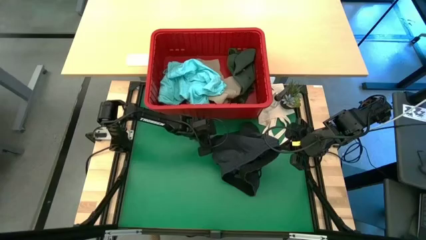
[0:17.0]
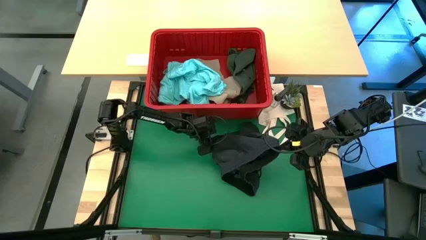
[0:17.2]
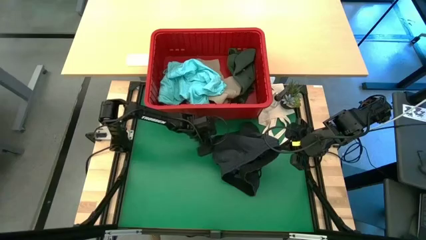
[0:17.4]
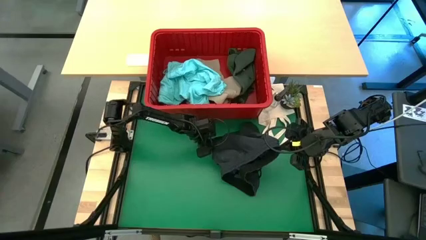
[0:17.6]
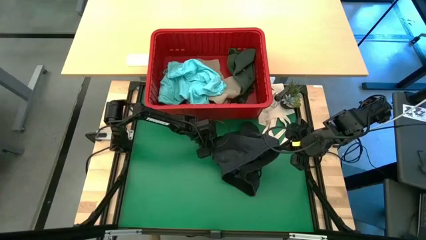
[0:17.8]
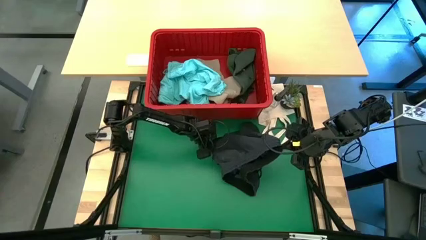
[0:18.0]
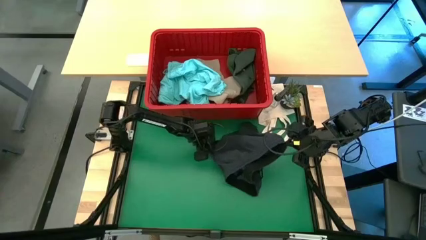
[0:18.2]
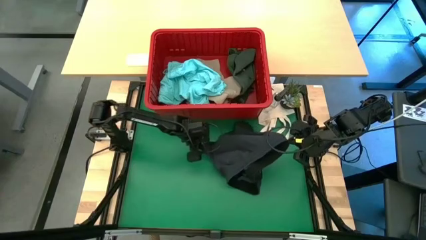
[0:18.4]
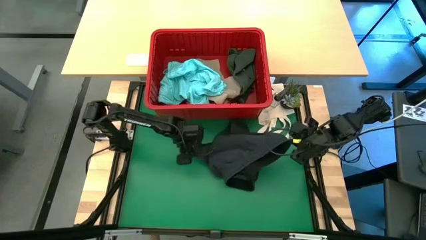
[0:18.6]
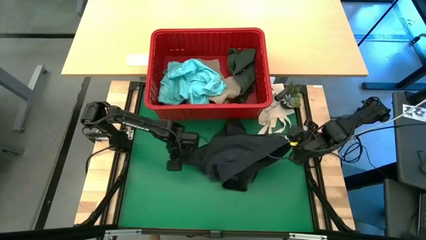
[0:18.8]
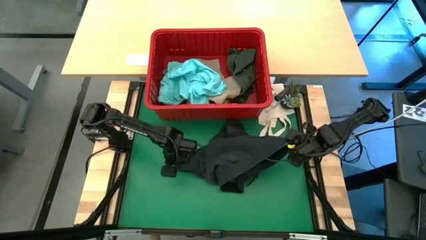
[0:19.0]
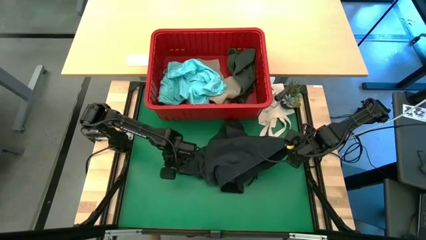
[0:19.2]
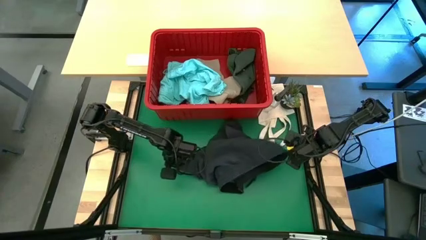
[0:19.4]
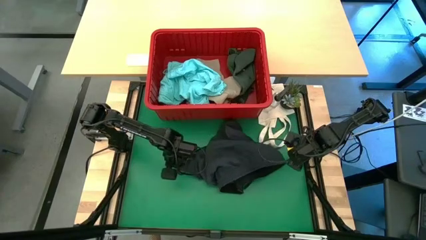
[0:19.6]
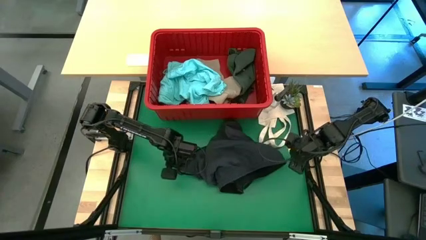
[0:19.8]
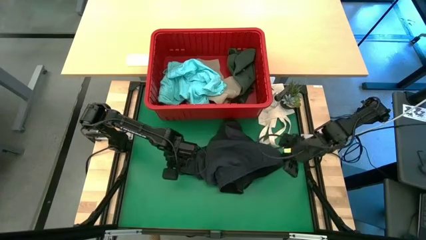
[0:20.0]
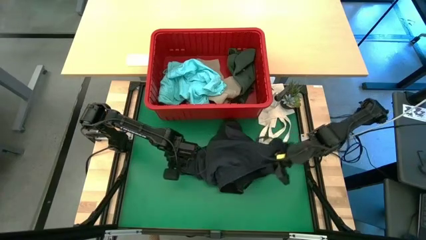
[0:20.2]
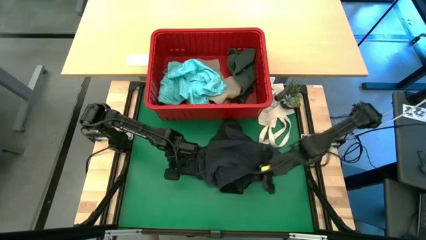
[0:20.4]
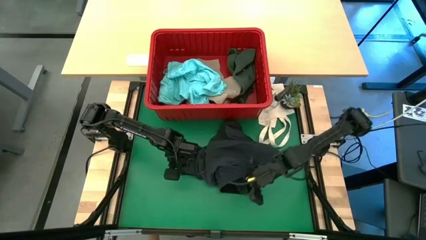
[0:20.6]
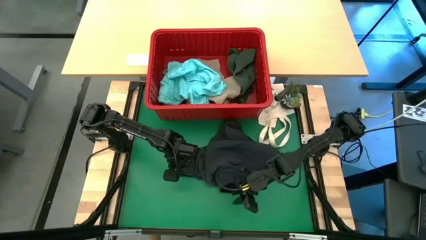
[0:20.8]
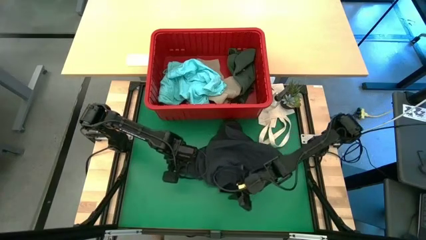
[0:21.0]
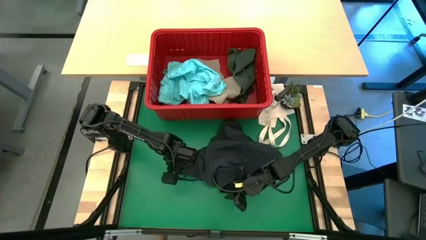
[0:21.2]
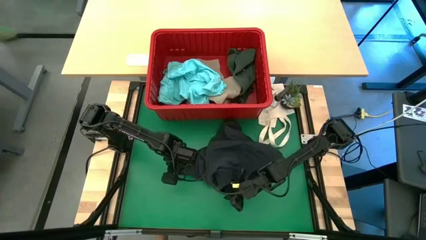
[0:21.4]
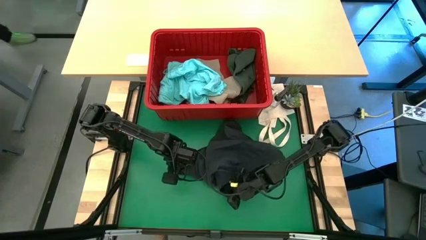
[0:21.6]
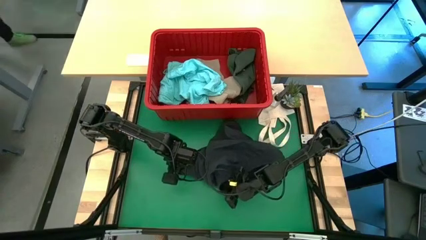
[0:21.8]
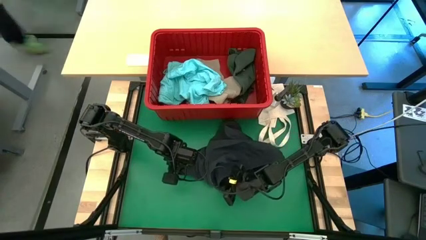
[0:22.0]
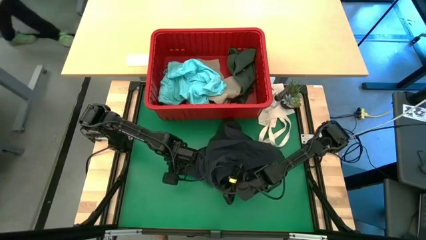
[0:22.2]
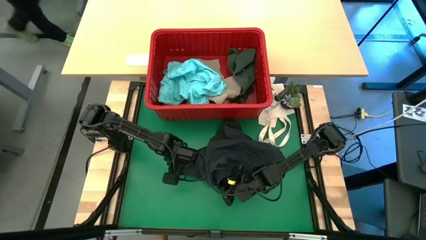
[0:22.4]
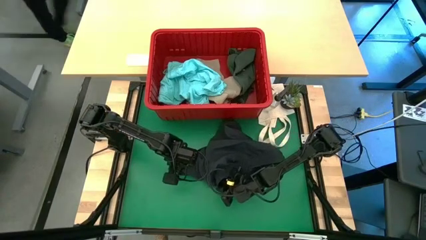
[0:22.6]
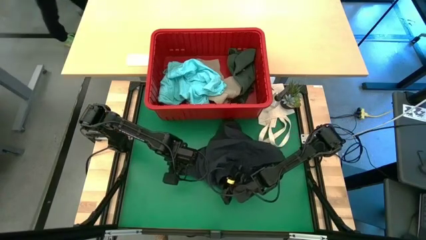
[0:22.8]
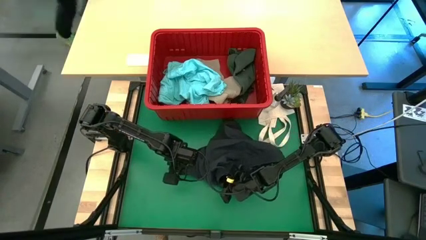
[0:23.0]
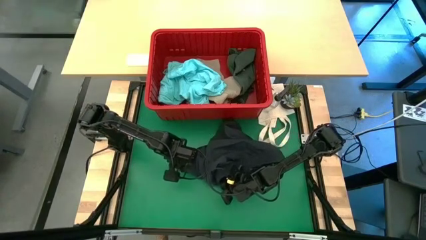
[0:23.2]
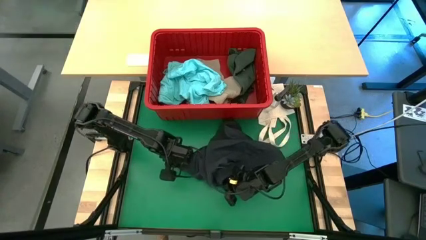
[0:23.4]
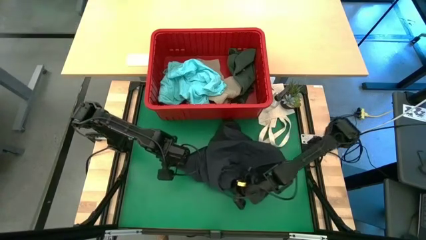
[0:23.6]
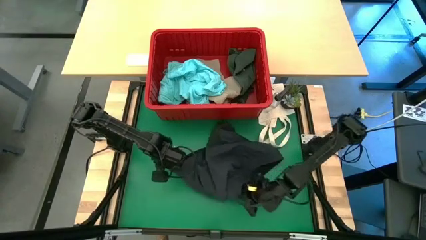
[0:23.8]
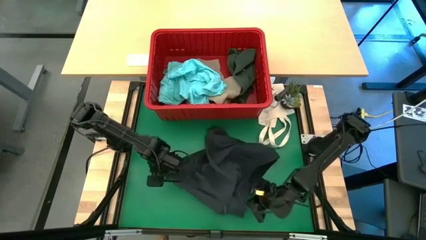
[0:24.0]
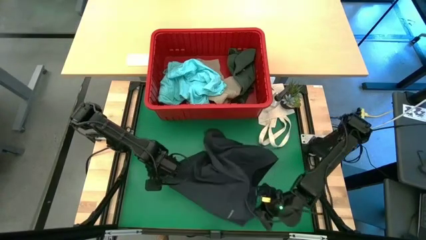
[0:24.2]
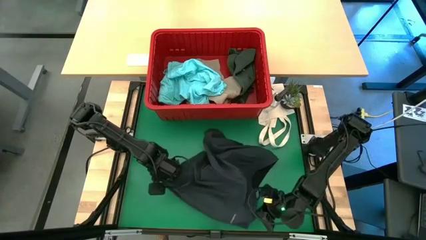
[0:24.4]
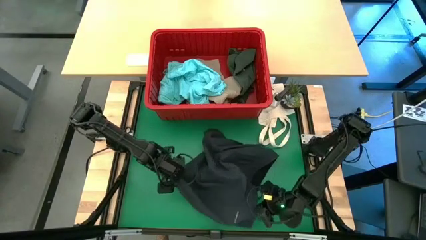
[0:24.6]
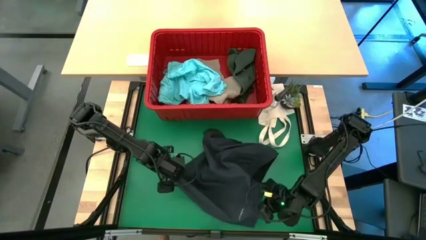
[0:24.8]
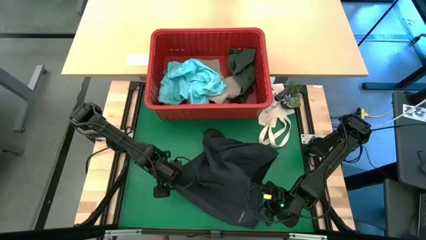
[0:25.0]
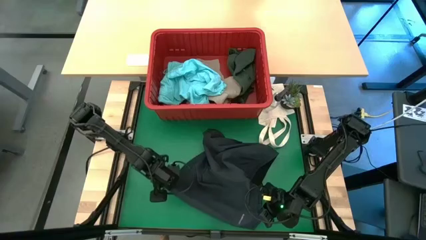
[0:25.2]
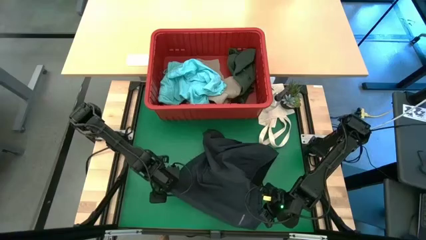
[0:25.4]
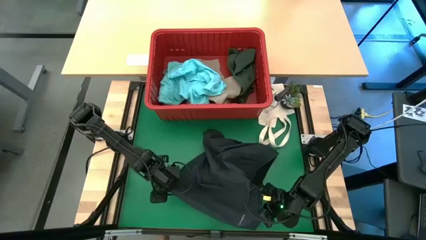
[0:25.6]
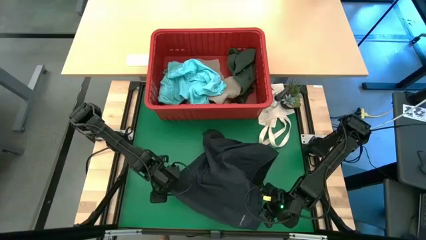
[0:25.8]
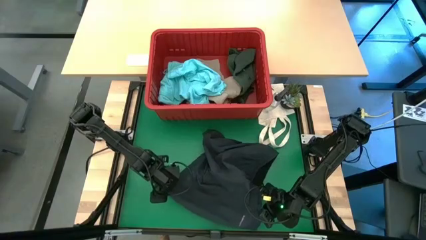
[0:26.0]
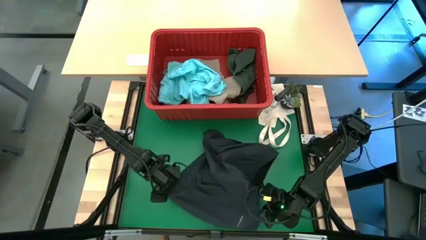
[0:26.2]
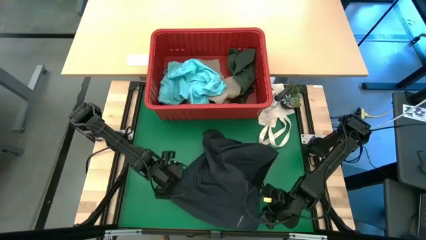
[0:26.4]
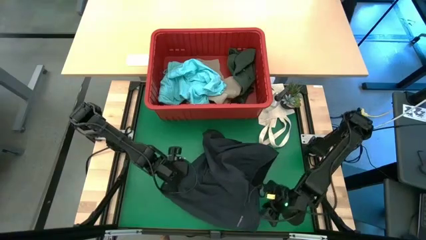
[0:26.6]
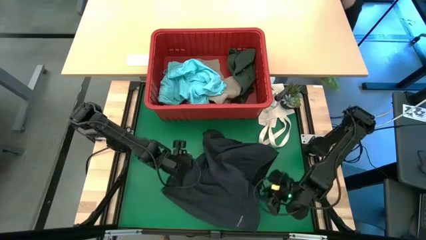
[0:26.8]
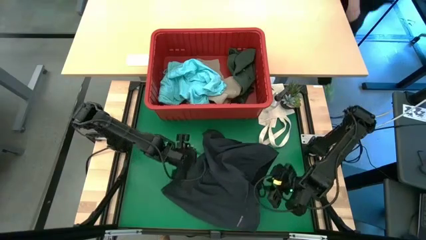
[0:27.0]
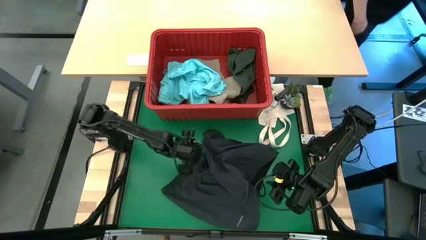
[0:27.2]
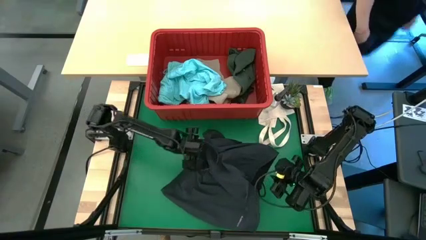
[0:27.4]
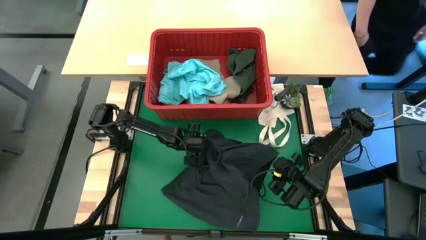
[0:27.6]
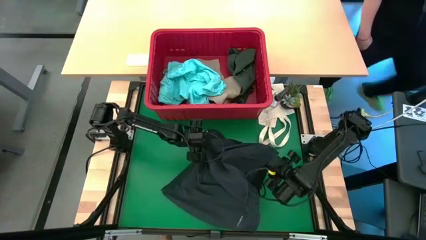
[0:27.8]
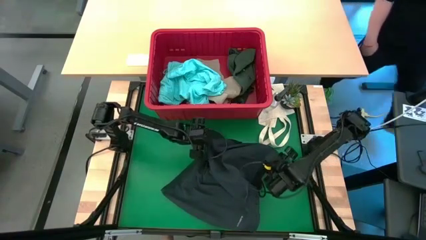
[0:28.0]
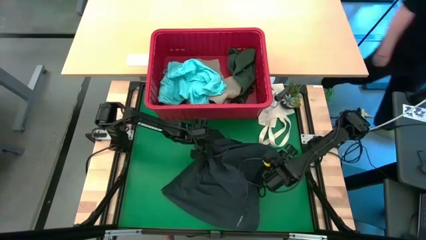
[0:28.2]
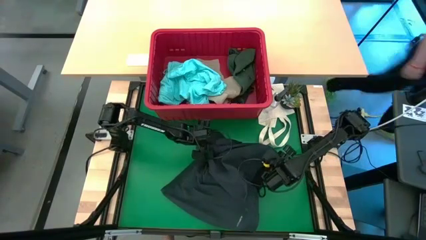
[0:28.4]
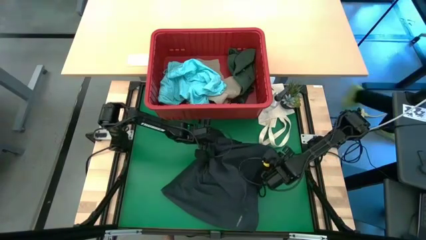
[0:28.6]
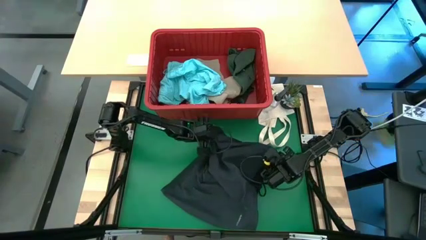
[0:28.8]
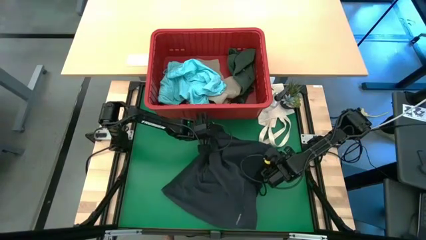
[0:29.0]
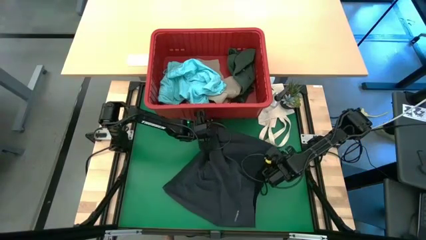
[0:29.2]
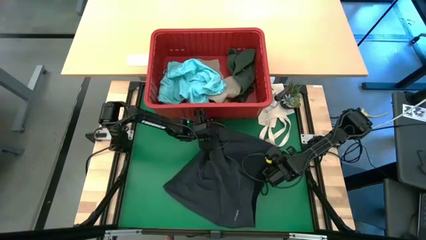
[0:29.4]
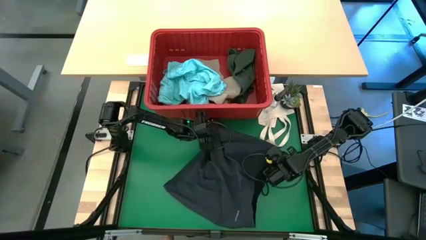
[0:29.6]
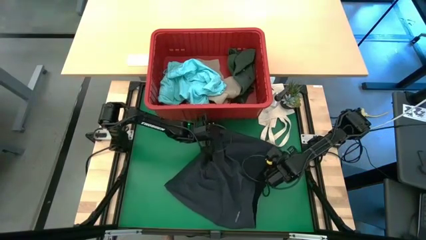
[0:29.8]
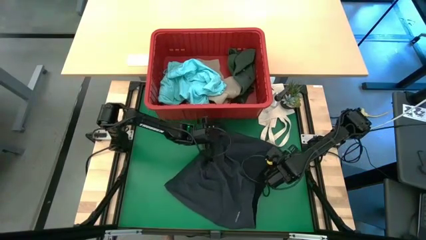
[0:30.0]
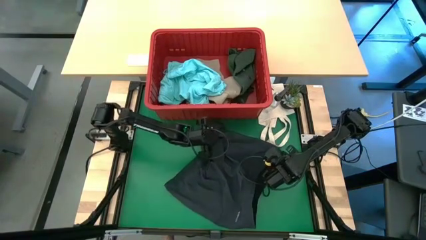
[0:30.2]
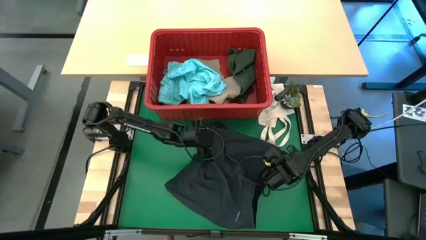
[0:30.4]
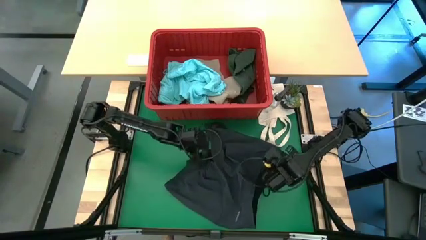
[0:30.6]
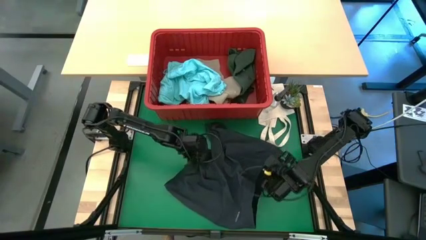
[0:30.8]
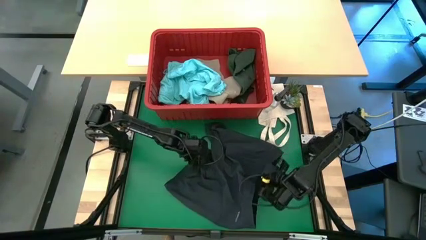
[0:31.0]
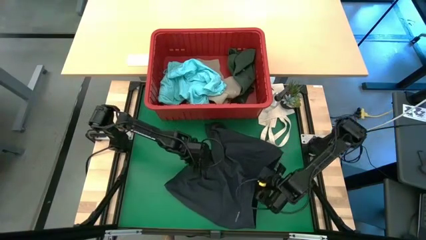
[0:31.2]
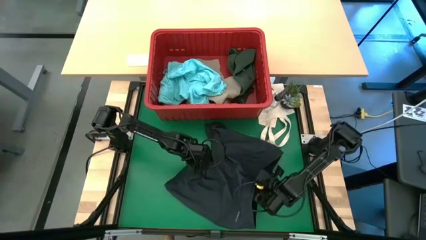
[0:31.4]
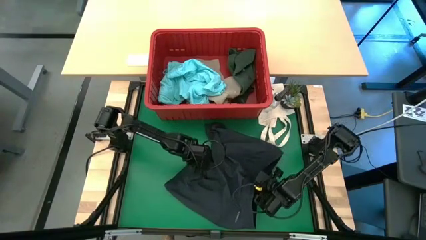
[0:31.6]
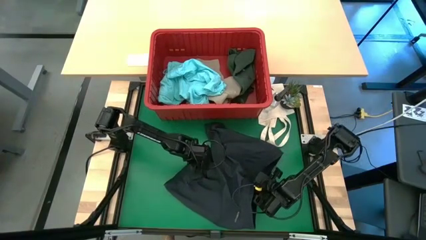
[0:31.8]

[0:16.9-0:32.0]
Task: Fold Laundry from Bin
Fold the black shorts from the red laundry bin
